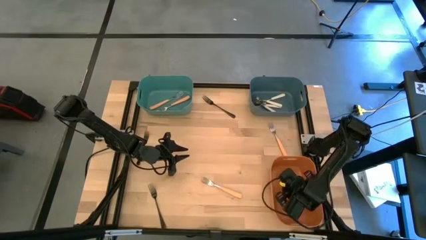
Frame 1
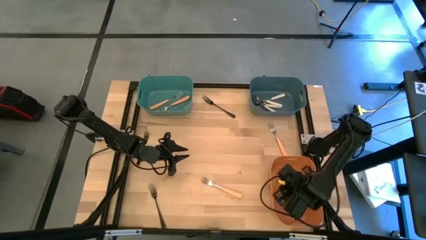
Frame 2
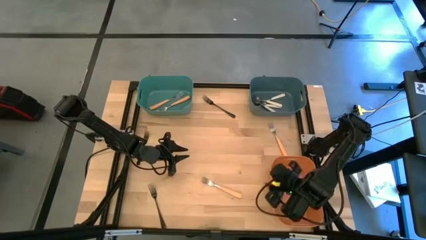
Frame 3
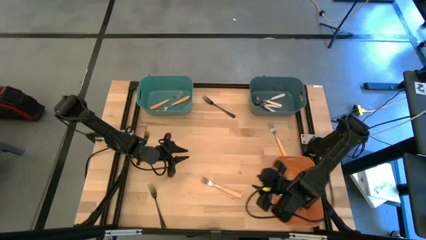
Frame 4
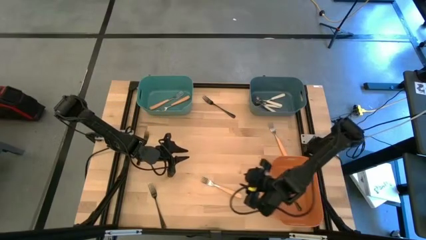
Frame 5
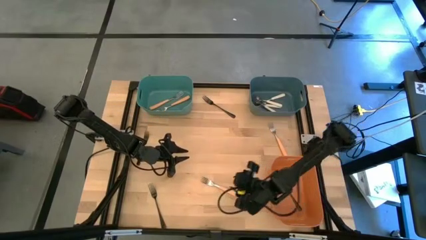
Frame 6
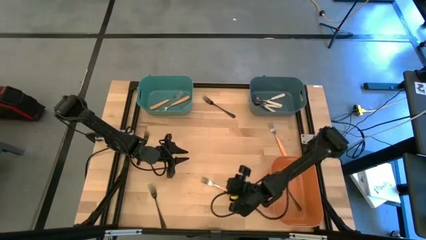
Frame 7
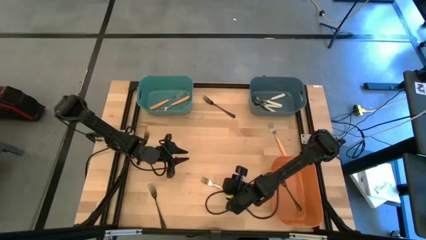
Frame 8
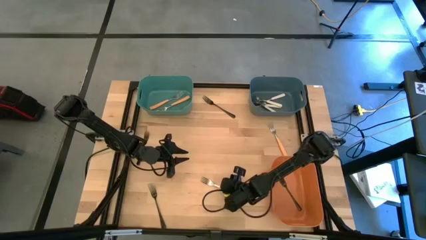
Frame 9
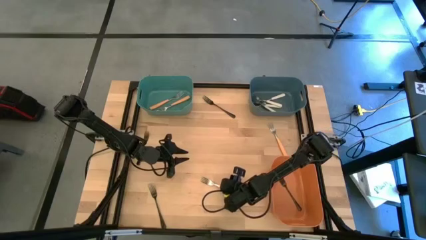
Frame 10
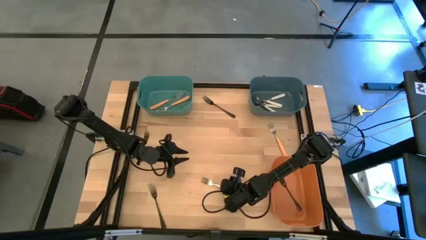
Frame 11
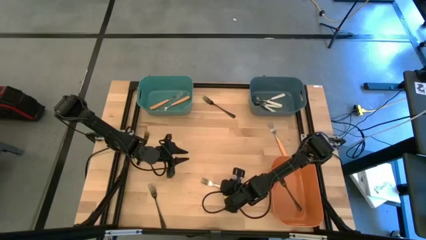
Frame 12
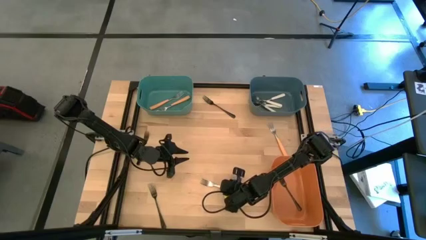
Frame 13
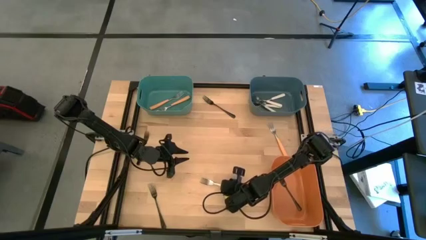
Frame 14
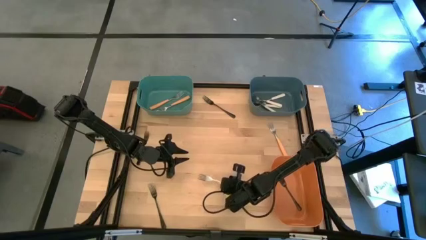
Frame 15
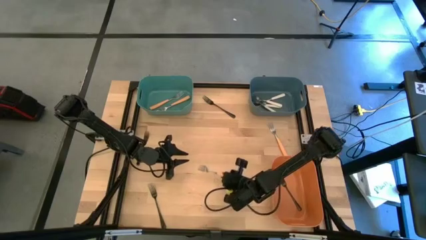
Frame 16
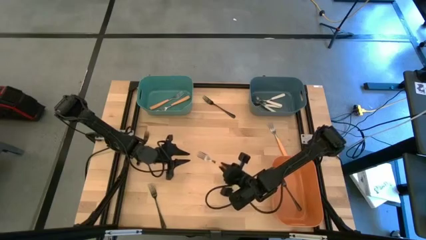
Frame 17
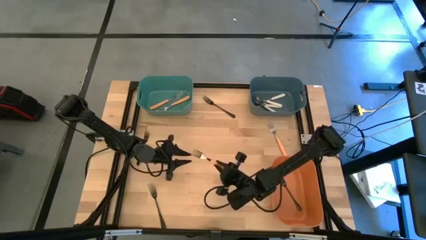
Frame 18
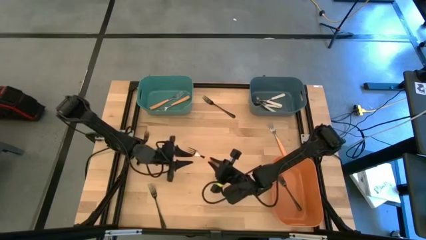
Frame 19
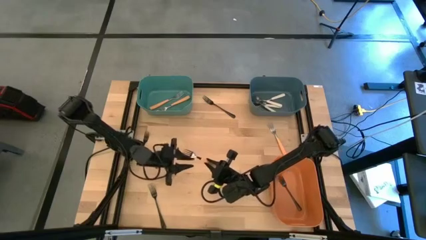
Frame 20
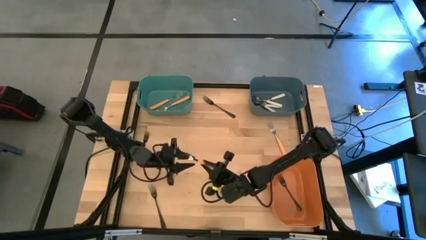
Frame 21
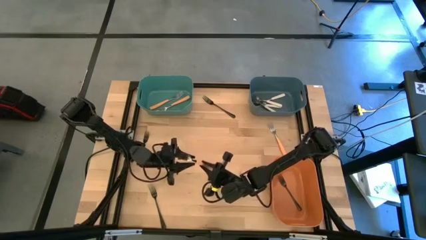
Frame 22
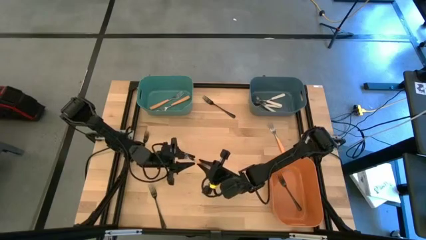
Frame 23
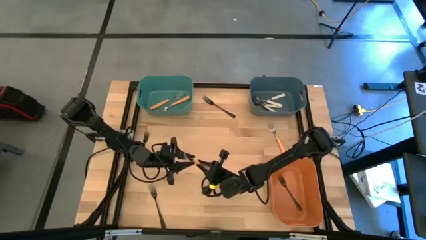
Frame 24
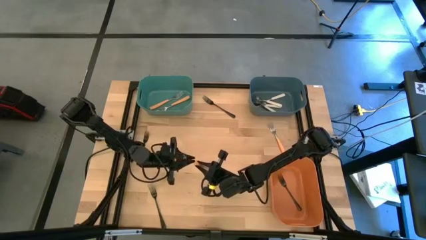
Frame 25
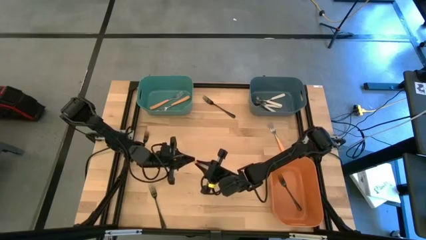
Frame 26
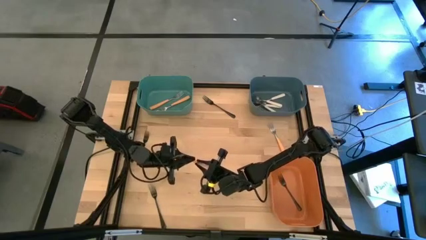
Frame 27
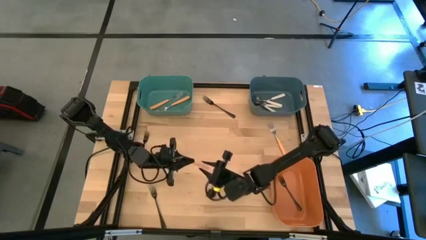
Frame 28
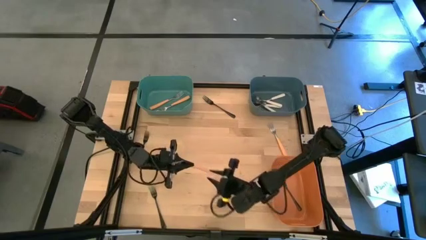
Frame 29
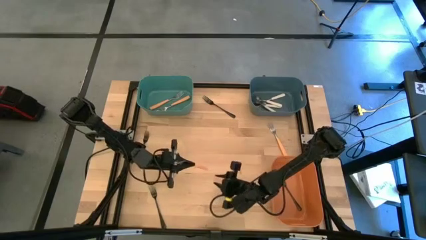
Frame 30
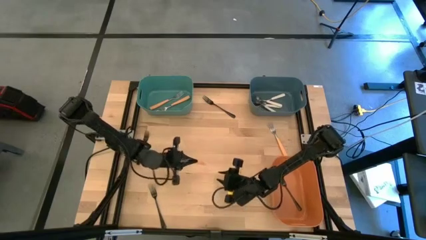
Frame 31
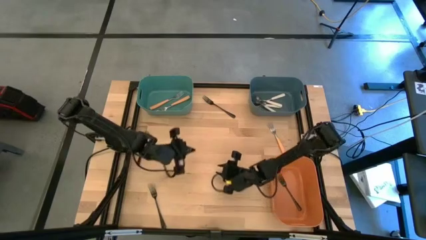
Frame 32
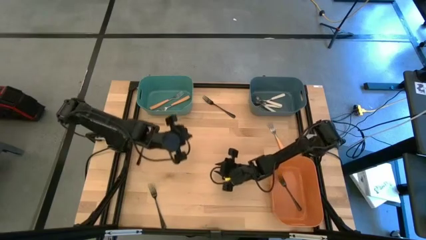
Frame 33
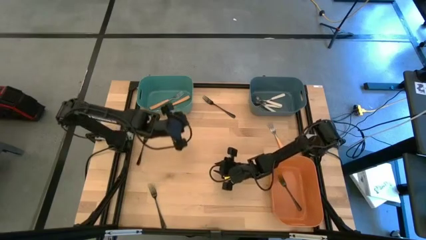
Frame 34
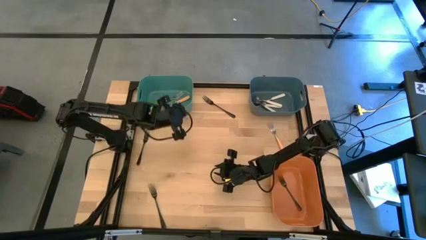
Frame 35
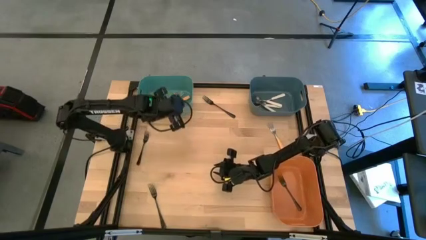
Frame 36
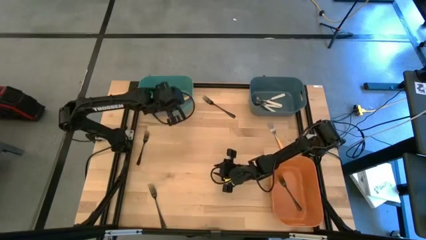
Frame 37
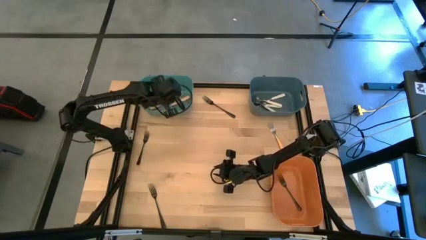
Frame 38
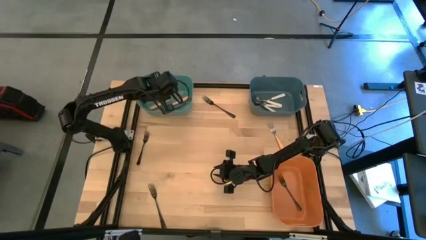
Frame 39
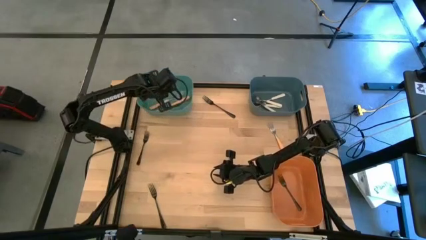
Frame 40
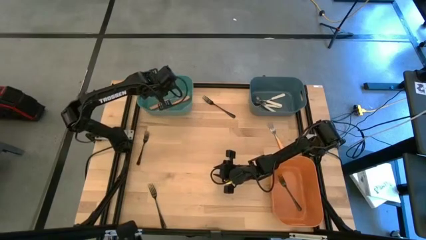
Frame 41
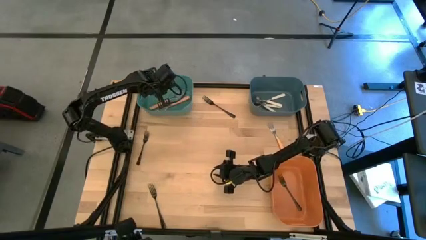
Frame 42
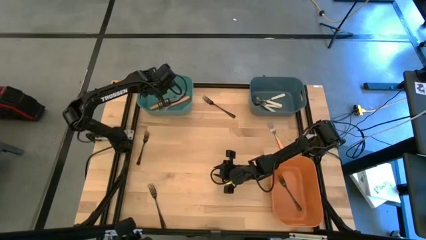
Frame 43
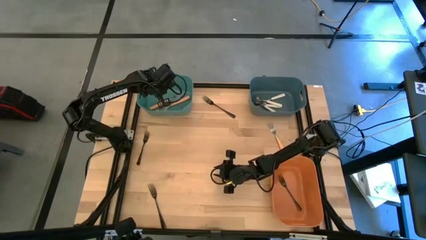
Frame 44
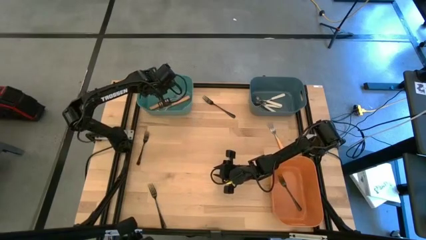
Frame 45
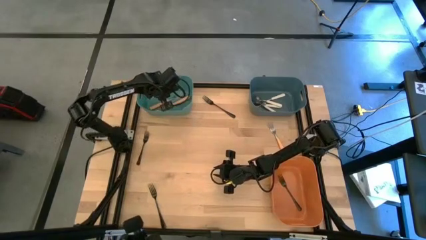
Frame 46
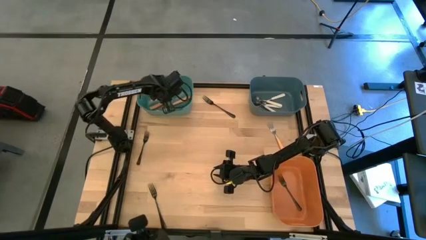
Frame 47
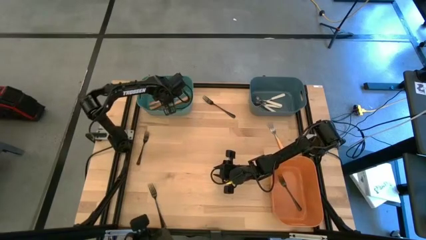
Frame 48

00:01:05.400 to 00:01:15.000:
Task: Sort silverware by color (type)
Put the brown fork into the green bin
